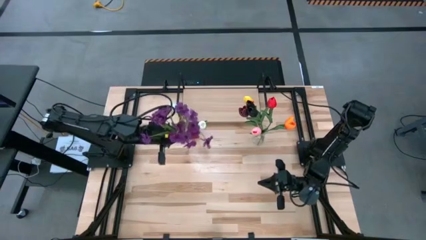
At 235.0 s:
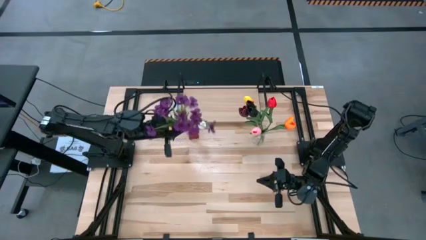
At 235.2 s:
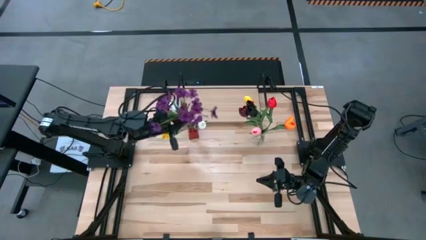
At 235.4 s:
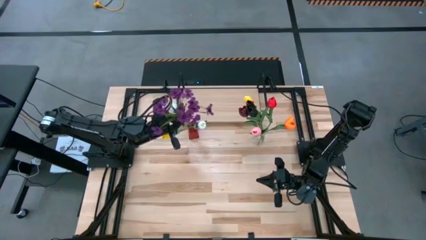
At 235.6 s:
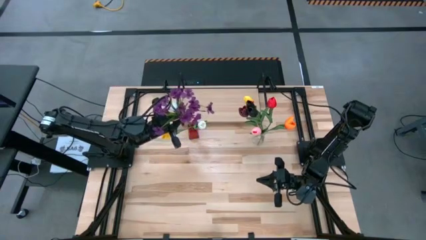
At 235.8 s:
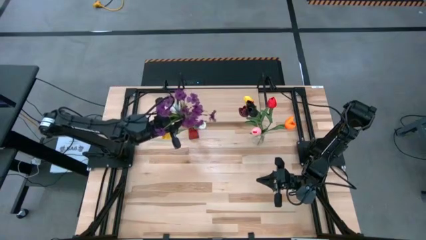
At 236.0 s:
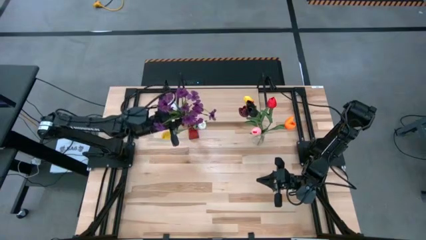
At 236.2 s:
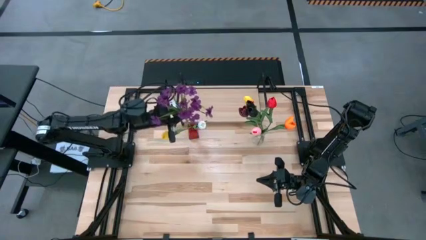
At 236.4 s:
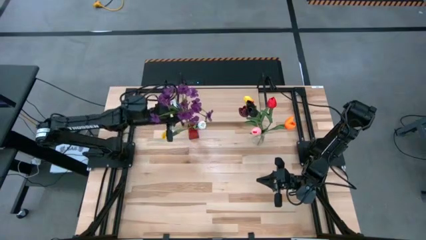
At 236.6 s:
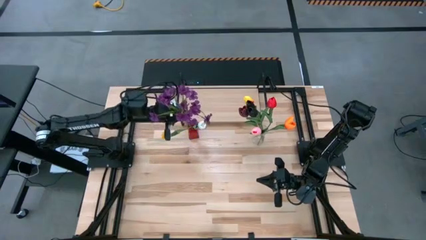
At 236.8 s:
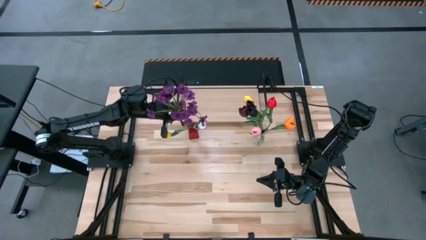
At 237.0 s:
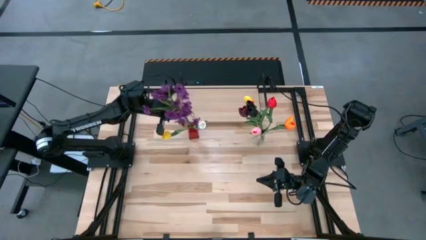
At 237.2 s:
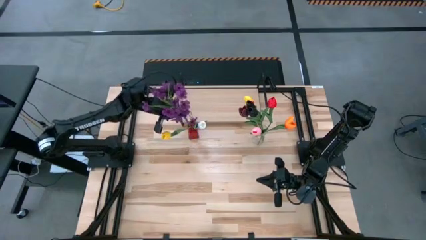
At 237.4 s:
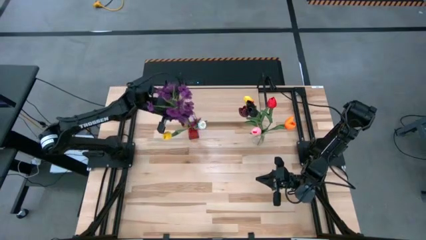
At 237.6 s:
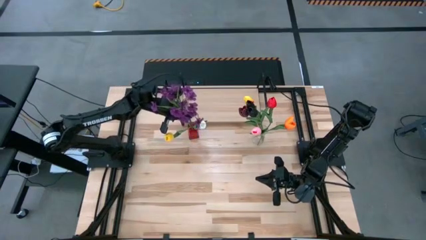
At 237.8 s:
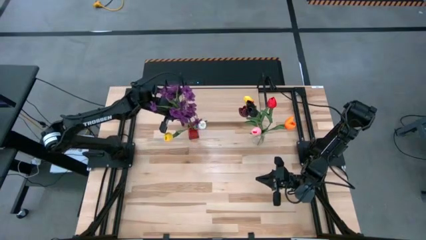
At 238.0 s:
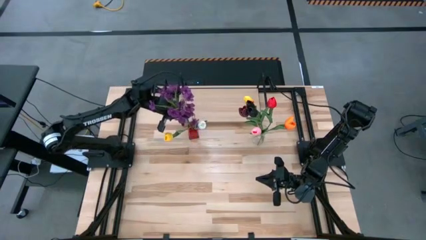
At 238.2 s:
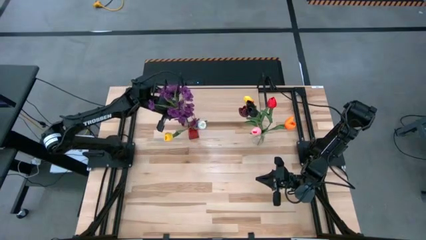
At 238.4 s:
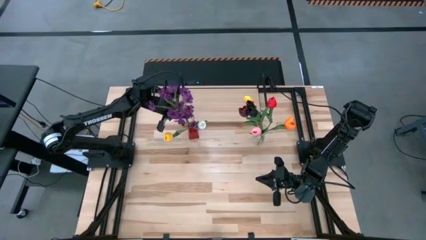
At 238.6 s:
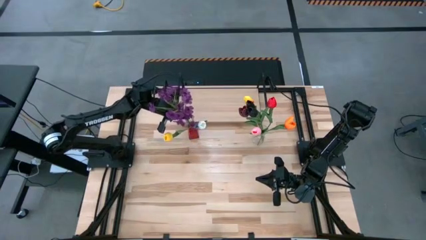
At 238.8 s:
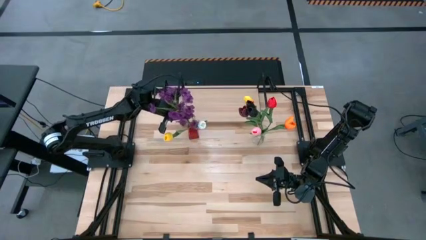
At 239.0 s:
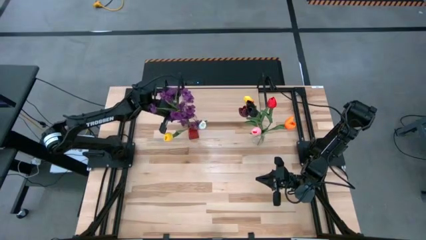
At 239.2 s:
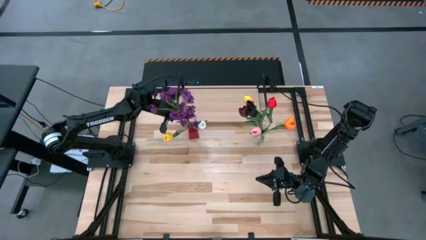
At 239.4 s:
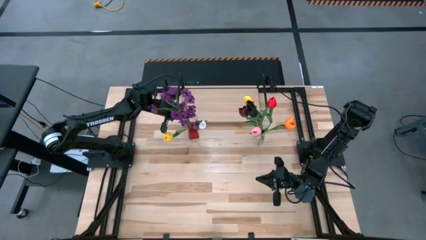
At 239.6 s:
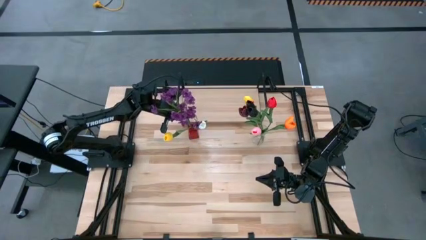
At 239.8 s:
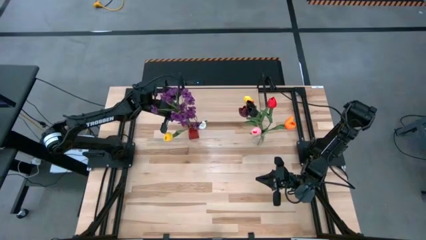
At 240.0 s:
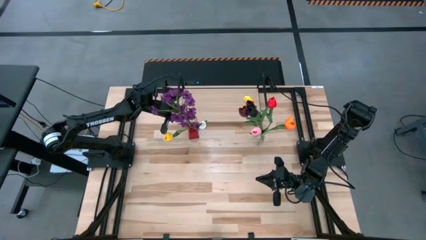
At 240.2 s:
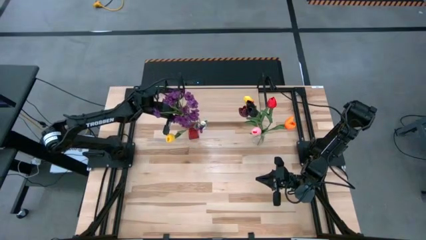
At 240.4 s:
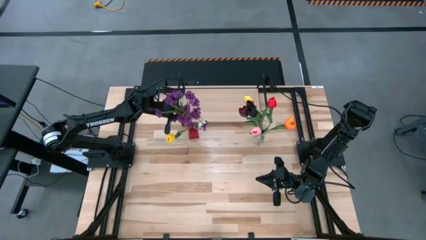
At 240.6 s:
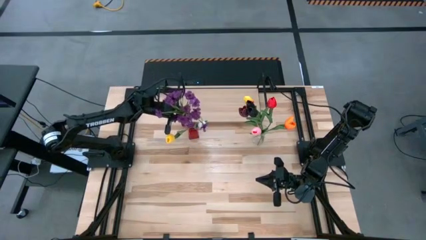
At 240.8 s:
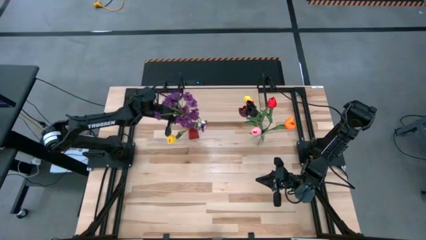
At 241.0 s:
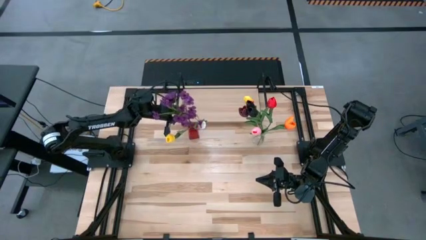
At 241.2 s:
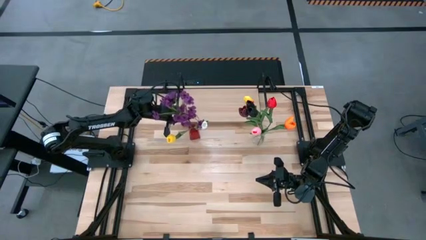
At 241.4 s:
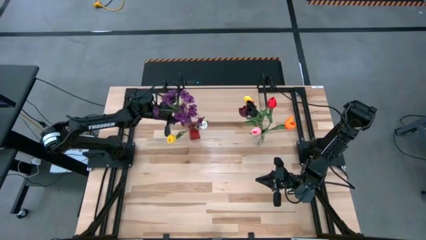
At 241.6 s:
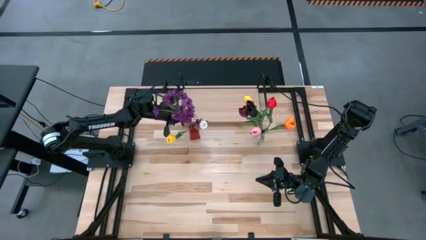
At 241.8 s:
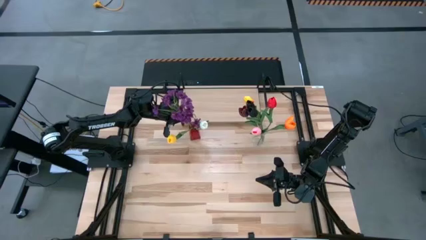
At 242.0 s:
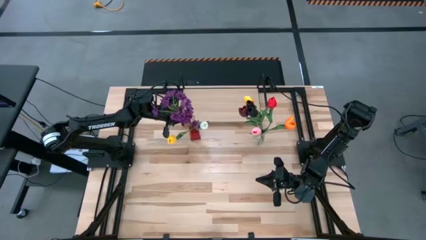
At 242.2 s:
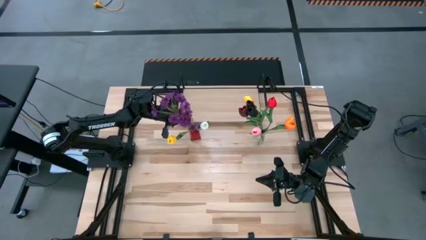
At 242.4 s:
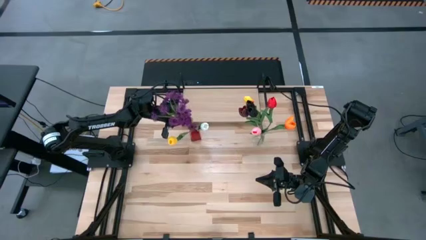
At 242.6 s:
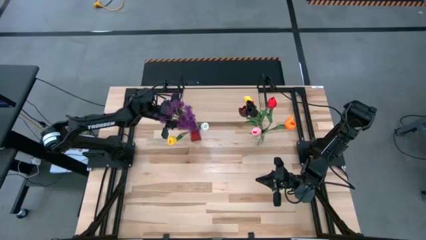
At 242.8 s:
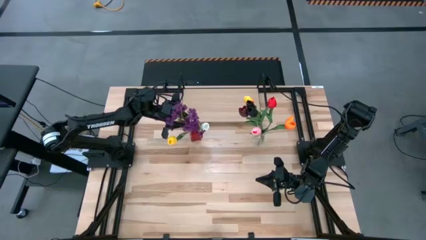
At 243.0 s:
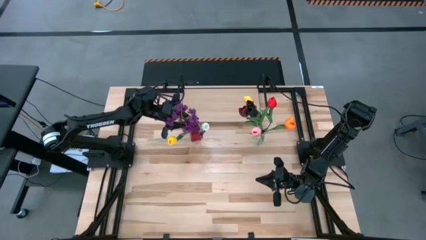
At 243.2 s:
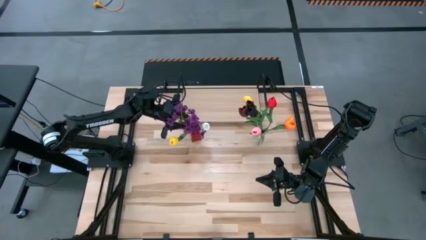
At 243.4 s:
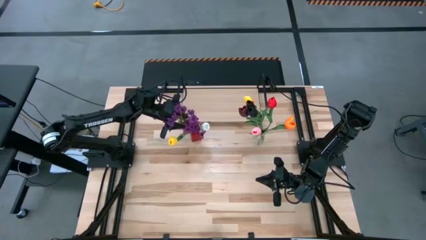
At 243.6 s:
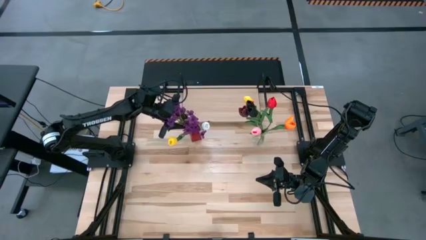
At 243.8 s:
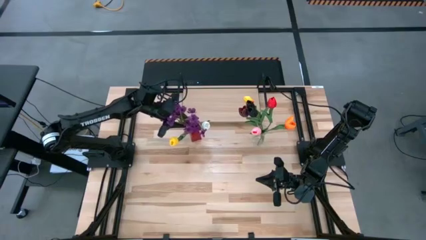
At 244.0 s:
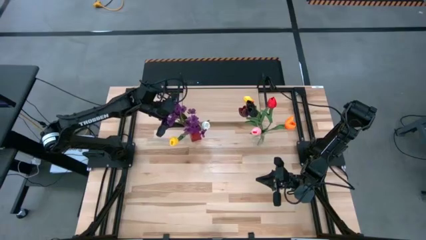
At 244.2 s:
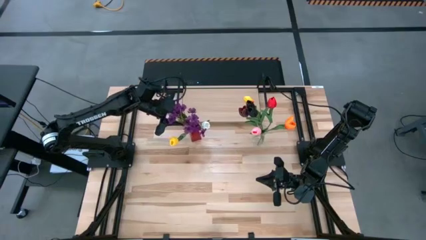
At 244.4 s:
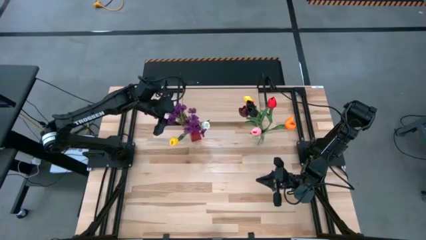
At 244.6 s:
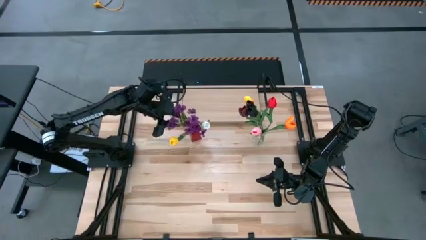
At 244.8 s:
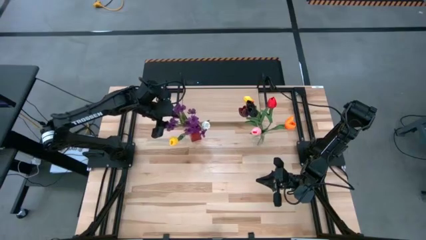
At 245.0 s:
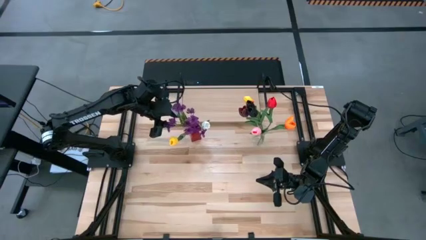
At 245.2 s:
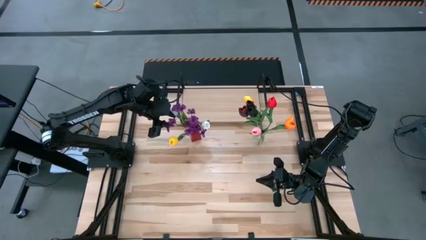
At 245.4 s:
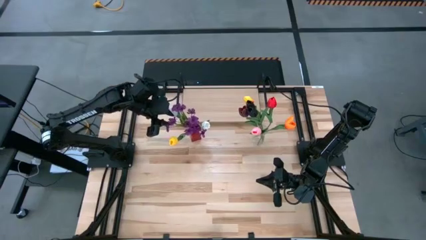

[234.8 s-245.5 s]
Task: Pick and place flowers into a vace then onto a shelf
Put the purple flowers into the red vase

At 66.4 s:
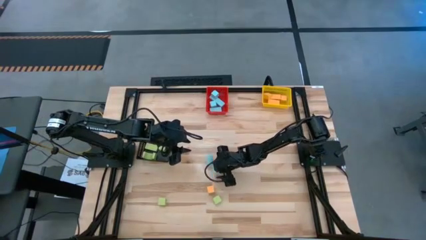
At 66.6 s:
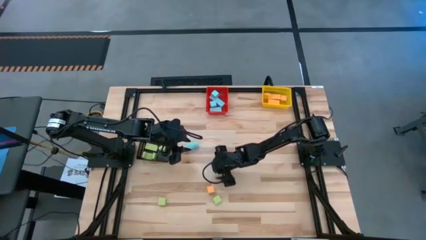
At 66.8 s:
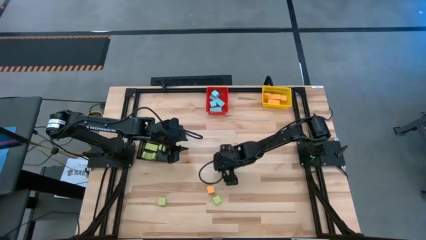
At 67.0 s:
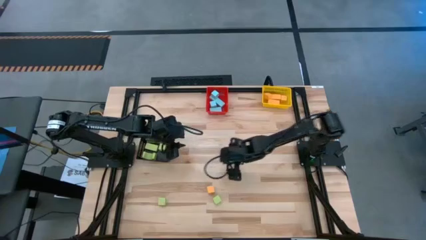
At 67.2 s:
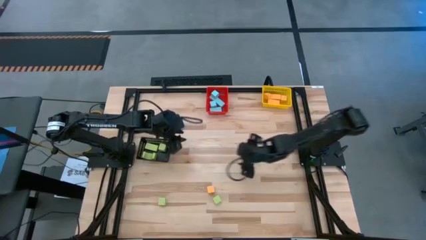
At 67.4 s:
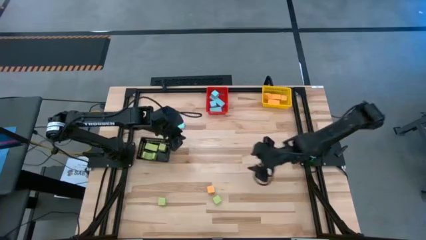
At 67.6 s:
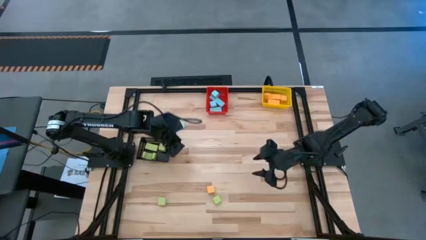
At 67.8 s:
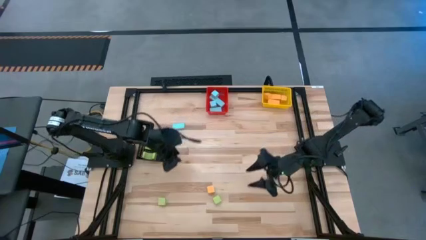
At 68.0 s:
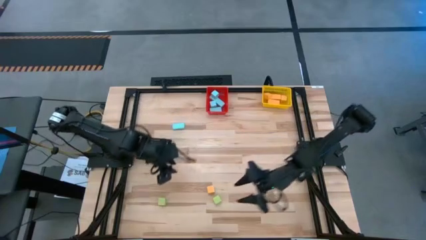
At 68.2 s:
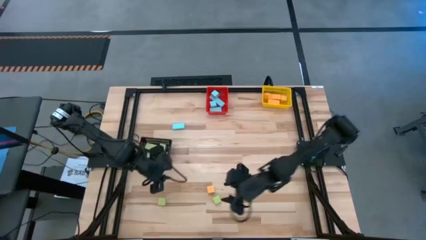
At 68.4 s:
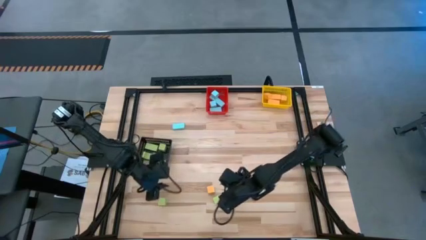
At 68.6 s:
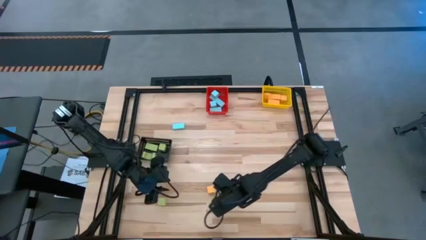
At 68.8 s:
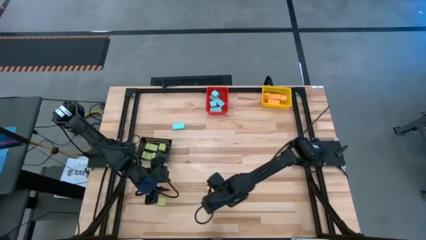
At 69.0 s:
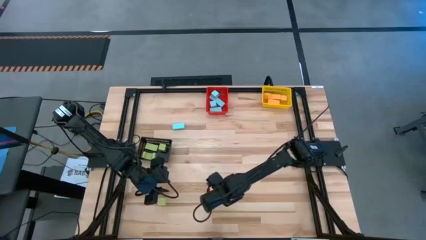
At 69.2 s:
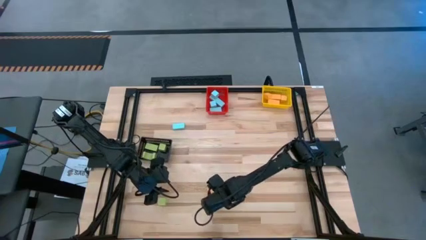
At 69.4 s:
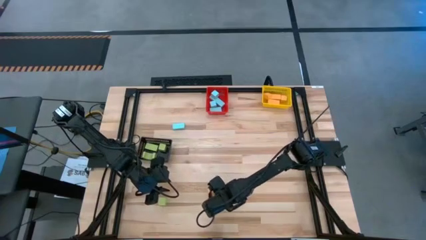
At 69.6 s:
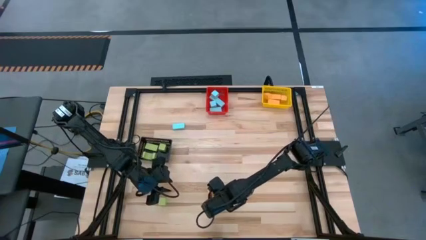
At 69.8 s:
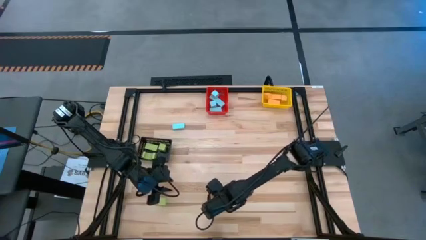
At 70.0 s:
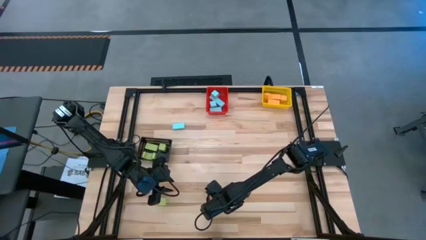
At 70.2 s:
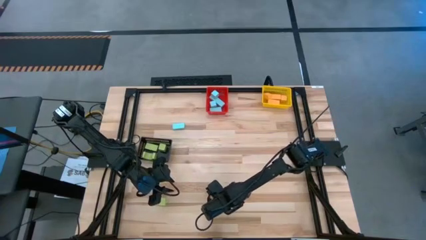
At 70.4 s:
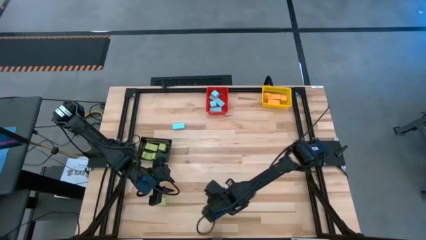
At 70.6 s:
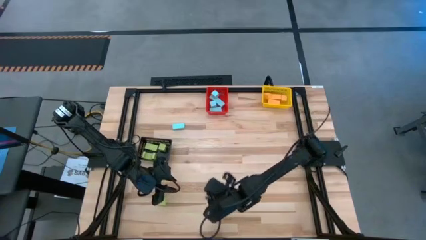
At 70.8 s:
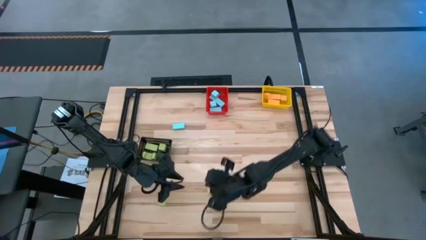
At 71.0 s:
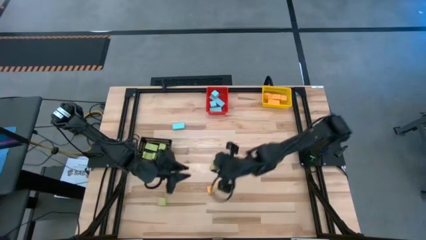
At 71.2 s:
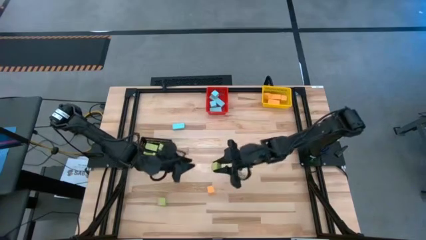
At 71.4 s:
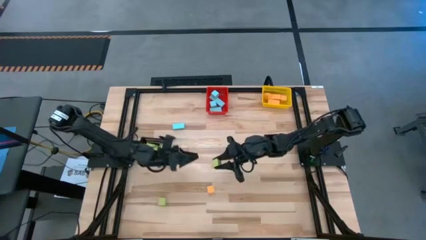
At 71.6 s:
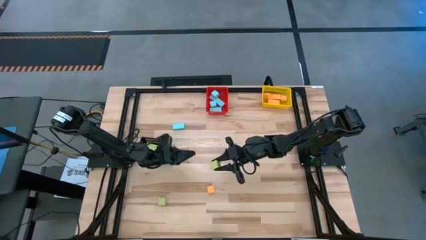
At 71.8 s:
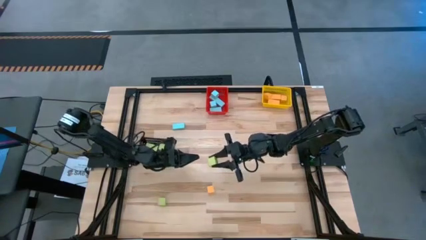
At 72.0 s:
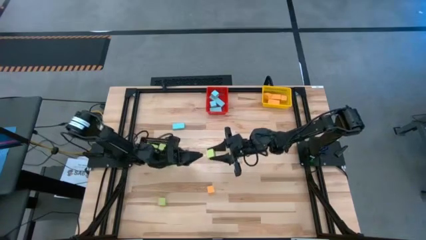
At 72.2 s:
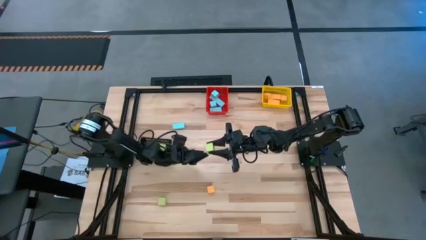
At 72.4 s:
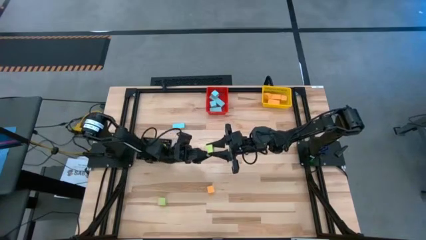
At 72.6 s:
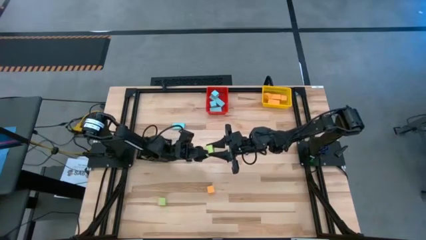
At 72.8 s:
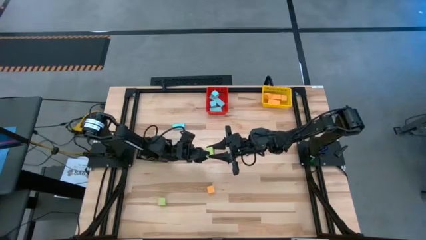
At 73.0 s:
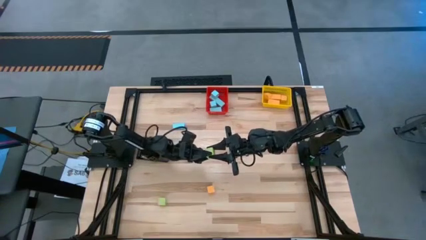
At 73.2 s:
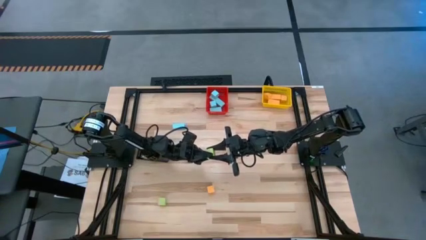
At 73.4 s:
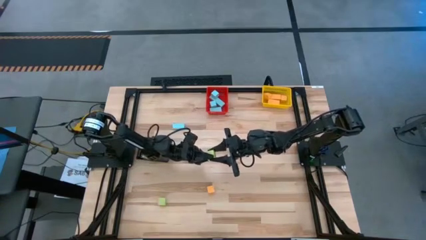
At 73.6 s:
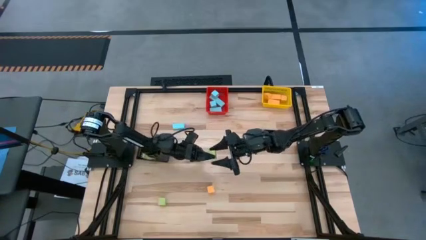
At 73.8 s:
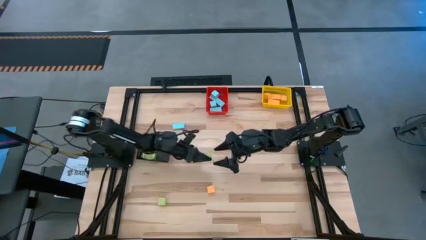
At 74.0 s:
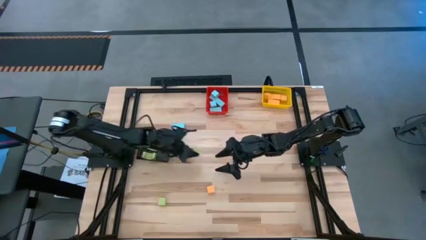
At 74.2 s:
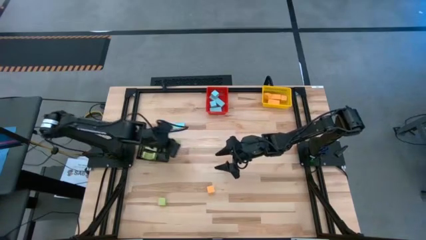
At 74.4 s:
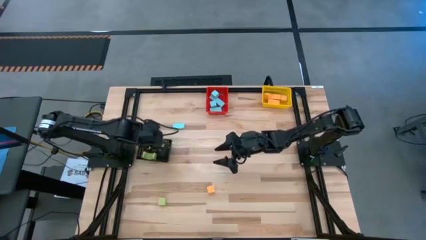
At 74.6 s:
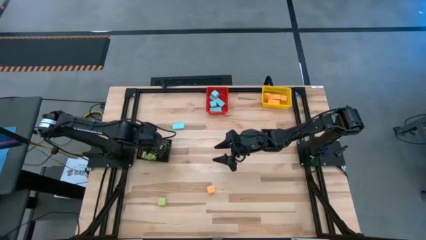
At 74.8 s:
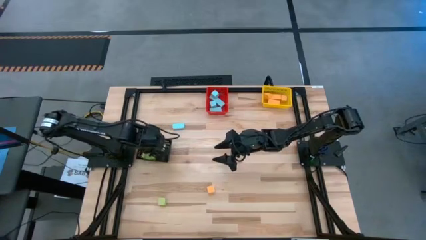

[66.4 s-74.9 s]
Task: Sort & place blocks by color
Put the green block into the black bin
